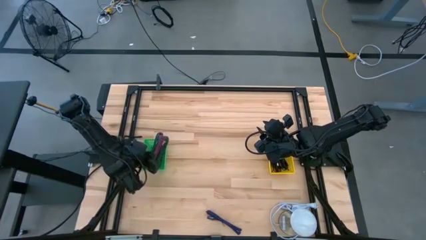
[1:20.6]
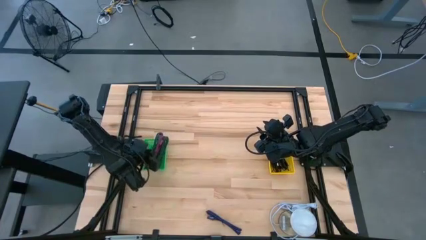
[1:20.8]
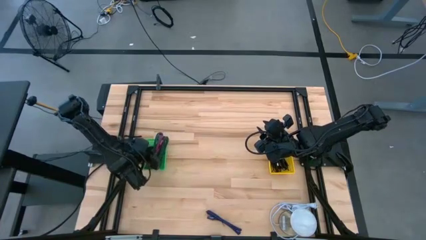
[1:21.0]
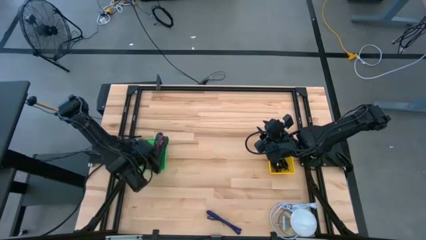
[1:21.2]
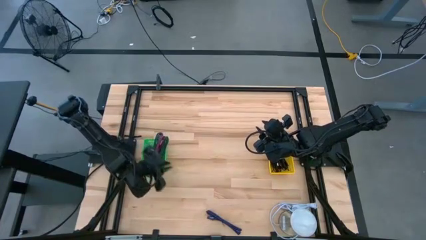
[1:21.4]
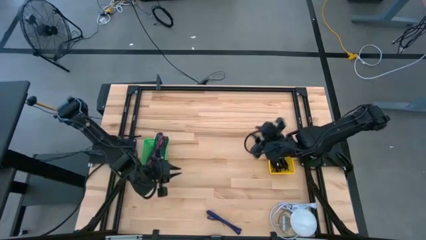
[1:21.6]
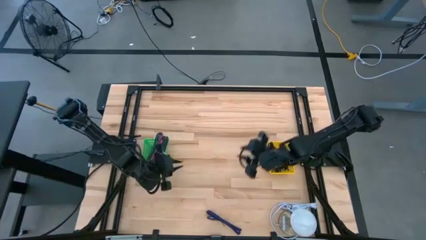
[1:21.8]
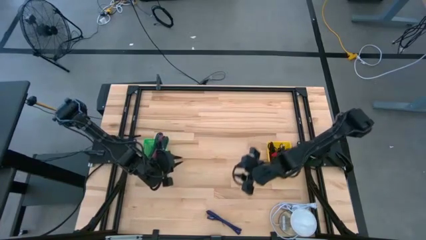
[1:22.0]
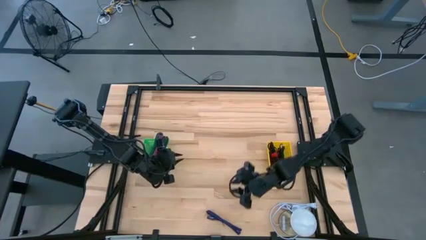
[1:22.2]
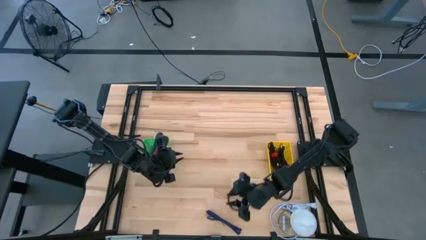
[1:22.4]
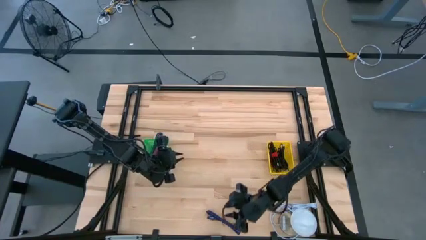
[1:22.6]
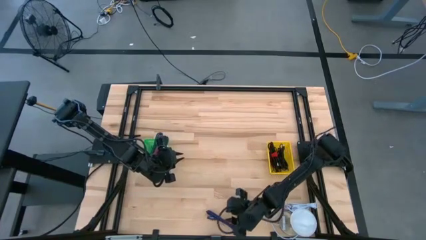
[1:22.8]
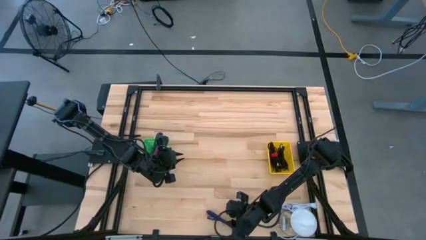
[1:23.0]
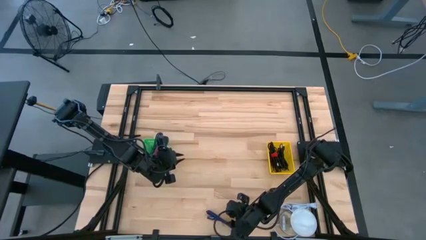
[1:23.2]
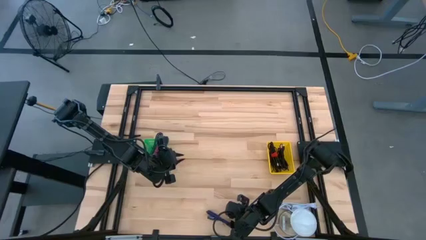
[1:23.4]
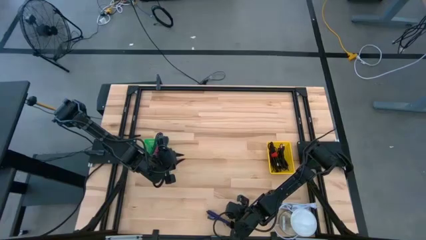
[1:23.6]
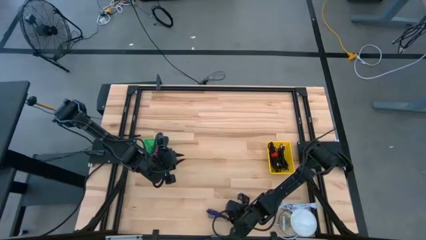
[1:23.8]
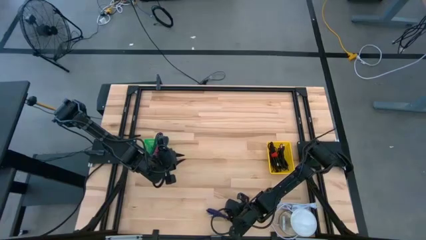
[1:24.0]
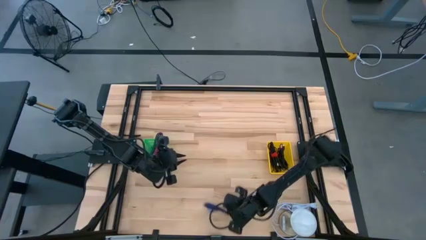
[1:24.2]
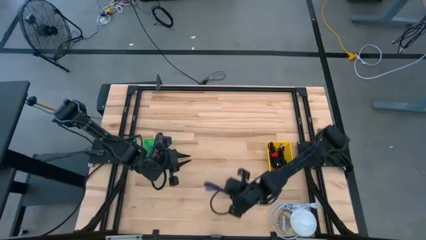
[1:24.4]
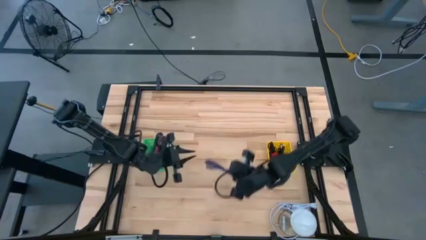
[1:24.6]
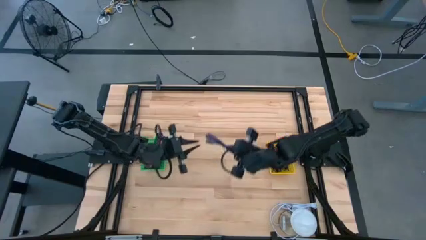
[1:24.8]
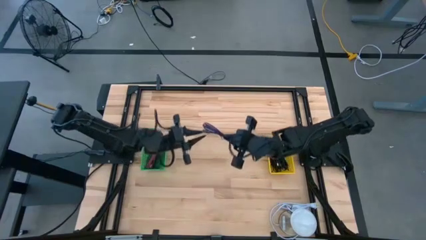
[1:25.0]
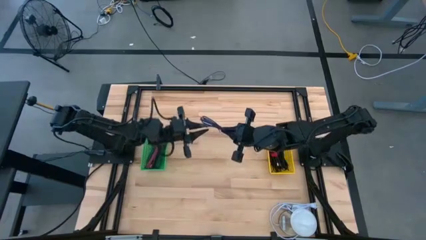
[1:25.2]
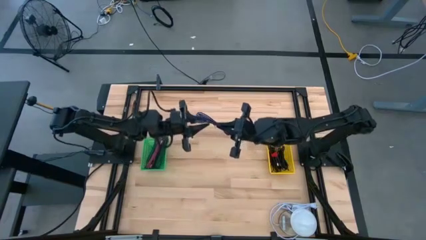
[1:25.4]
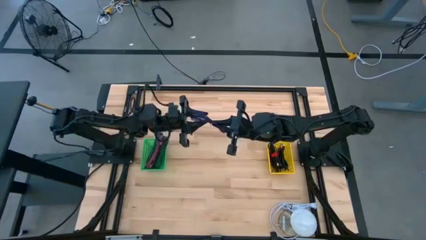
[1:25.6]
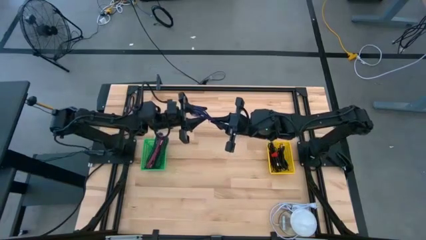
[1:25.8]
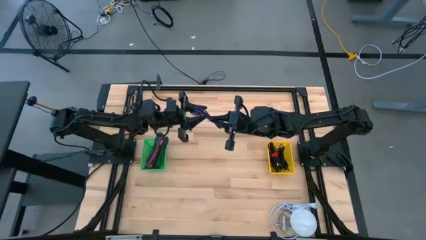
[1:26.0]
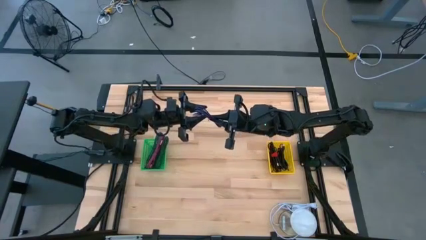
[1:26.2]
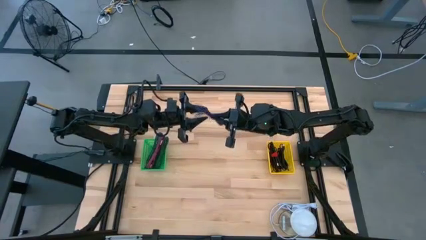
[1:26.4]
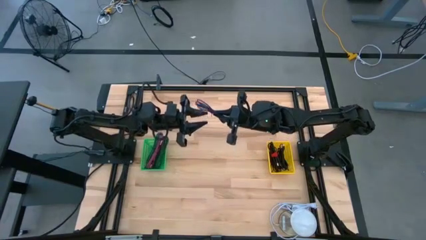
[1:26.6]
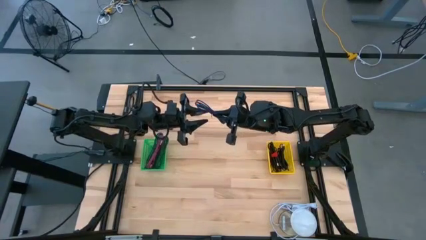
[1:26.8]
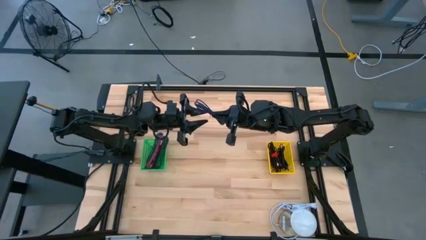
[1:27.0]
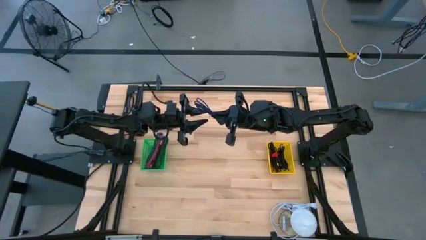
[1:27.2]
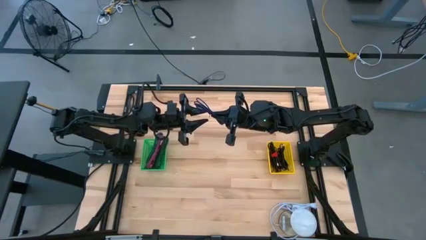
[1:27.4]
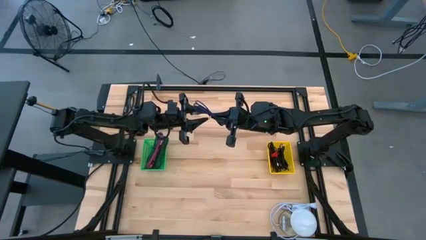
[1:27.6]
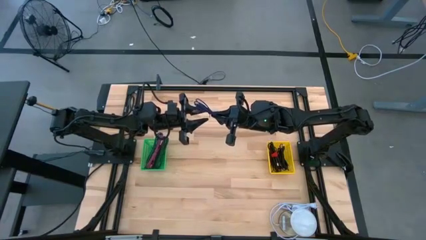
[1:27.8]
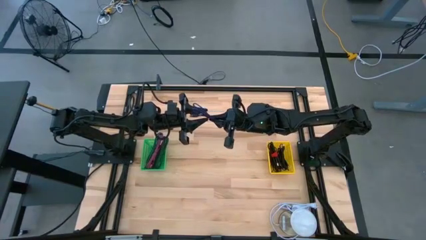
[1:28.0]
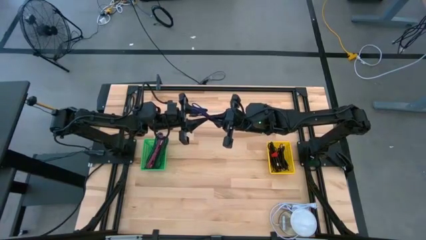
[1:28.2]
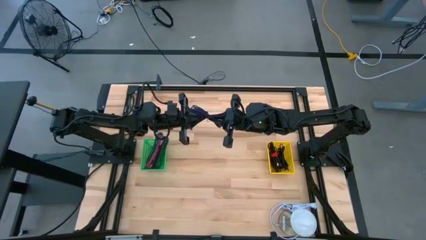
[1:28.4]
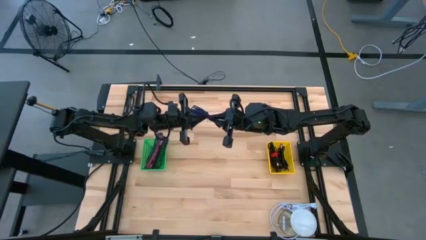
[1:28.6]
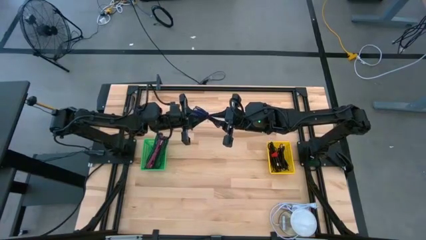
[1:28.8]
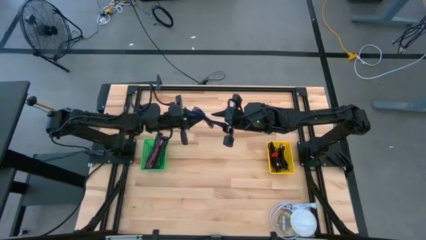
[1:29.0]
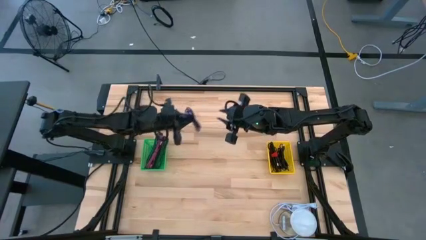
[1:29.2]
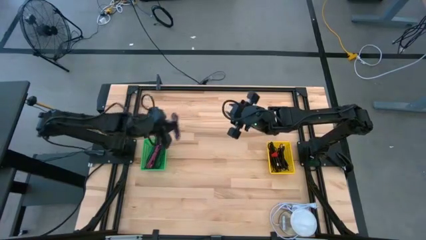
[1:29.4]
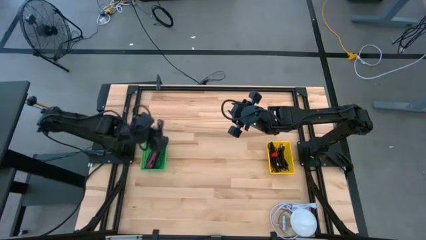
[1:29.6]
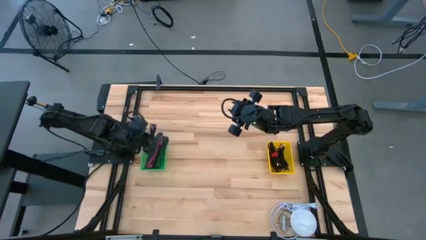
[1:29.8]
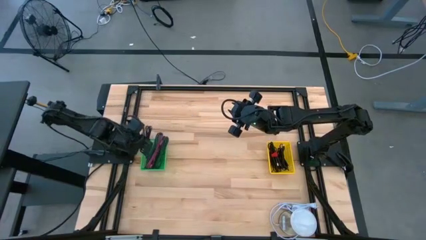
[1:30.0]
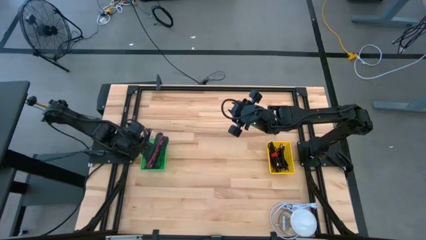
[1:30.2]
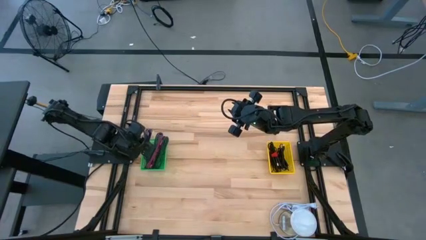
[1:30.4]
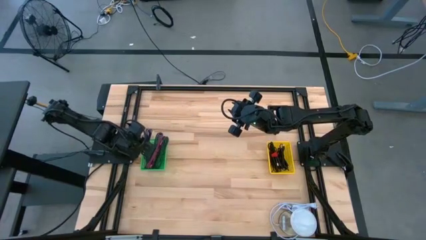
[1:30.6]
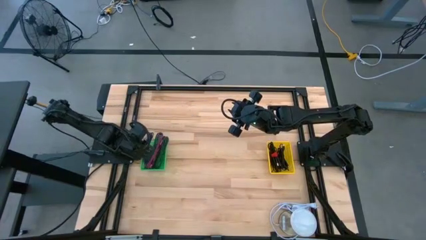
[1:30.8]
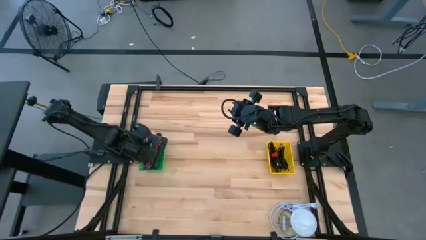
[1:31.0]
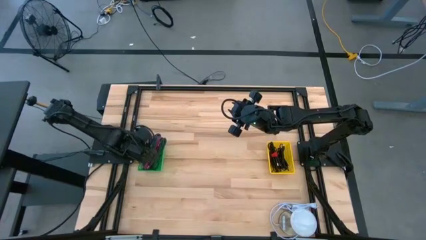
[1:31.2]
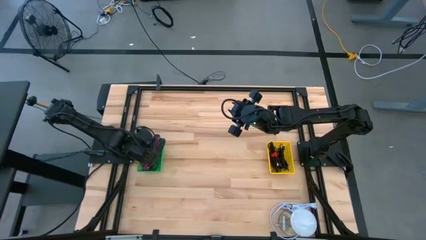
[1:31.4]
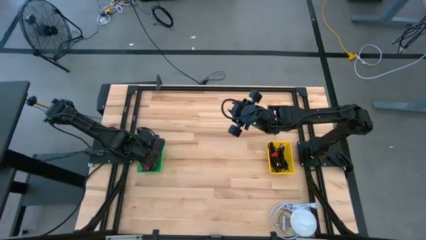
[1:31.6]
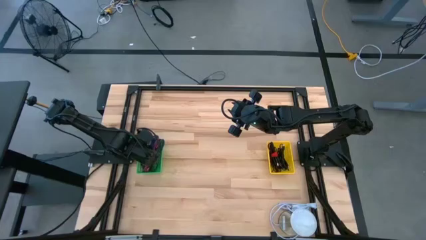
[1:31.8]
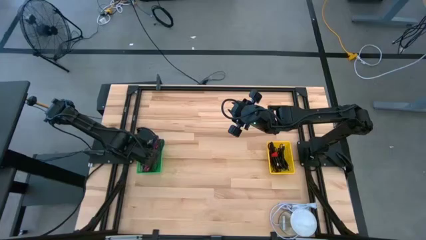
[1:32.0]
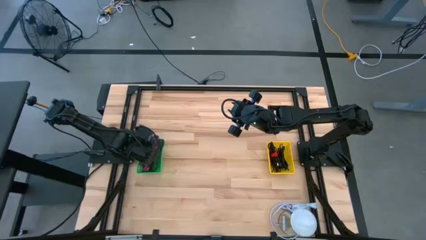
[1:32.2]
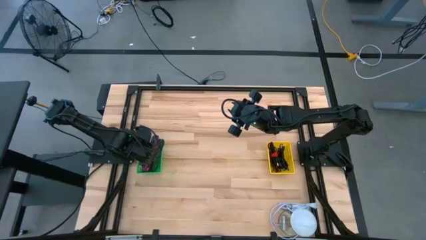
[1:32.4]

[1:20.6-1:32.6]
Task: Pick & Place USB Port
Put the purple black charger cable into the green bin

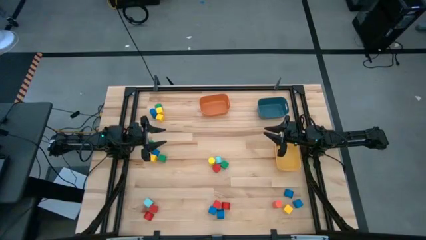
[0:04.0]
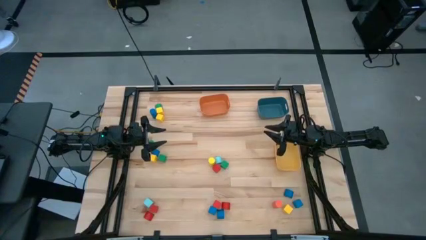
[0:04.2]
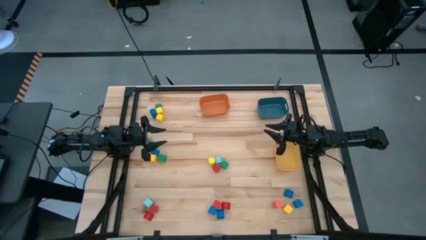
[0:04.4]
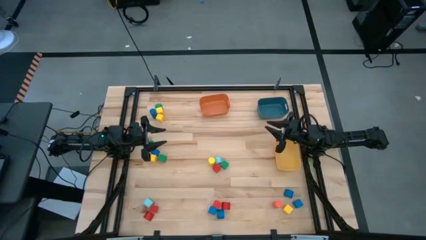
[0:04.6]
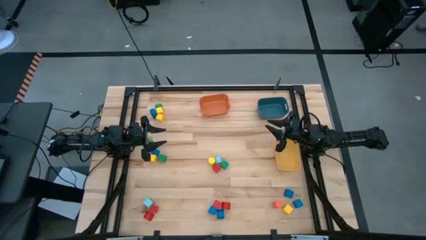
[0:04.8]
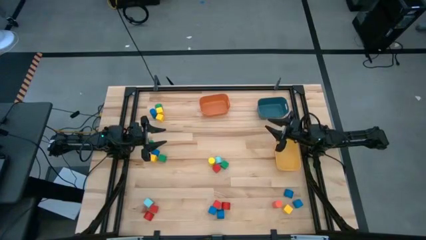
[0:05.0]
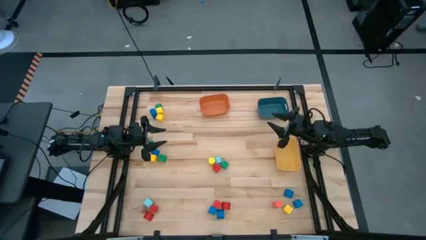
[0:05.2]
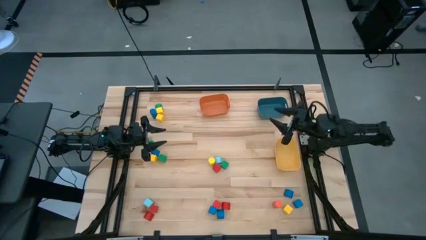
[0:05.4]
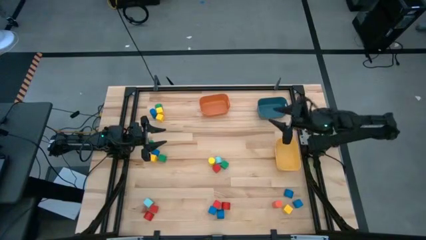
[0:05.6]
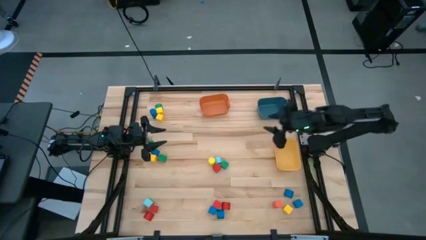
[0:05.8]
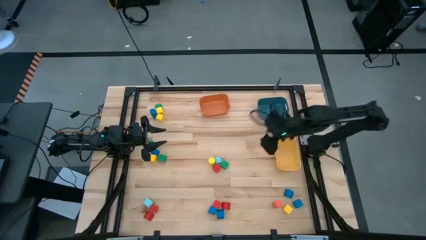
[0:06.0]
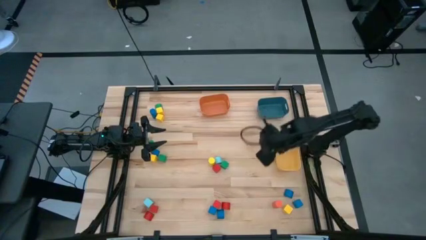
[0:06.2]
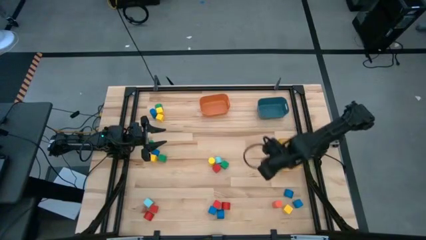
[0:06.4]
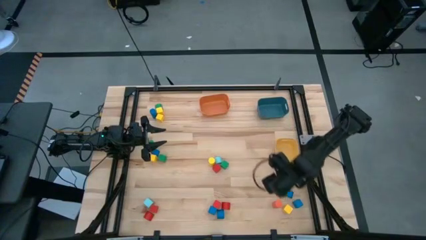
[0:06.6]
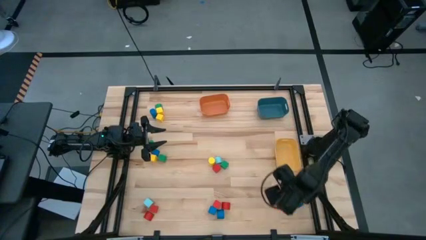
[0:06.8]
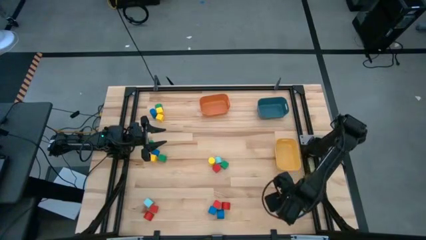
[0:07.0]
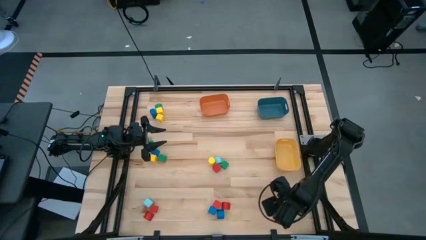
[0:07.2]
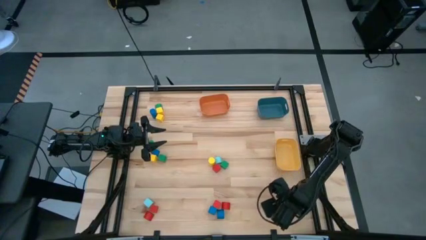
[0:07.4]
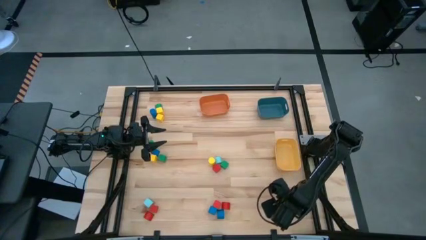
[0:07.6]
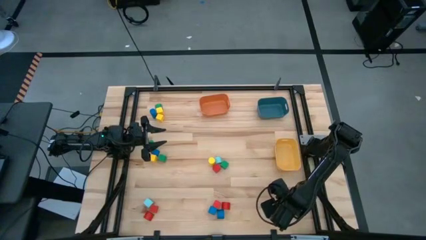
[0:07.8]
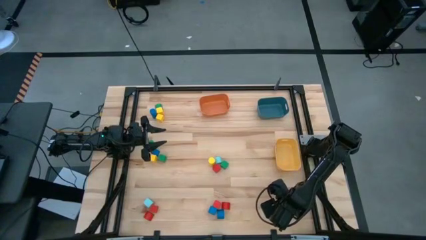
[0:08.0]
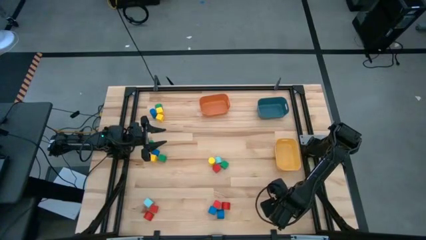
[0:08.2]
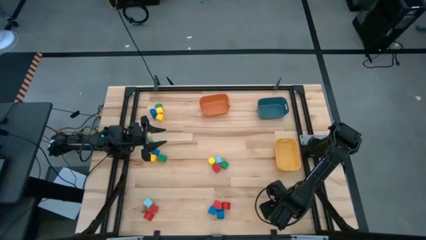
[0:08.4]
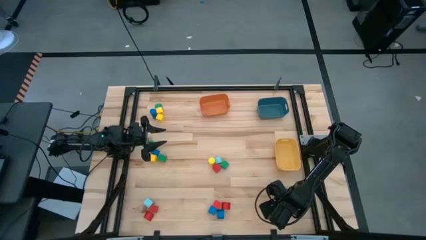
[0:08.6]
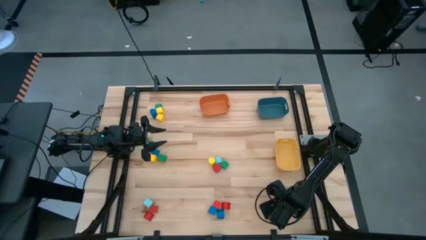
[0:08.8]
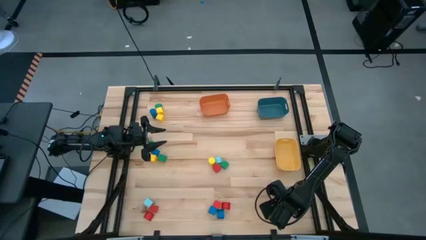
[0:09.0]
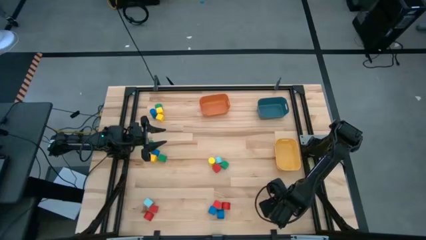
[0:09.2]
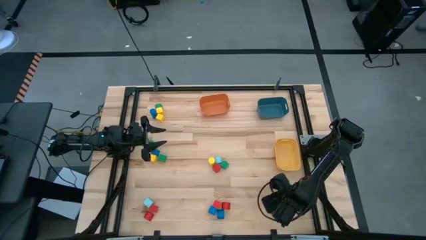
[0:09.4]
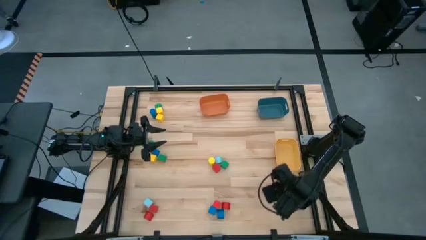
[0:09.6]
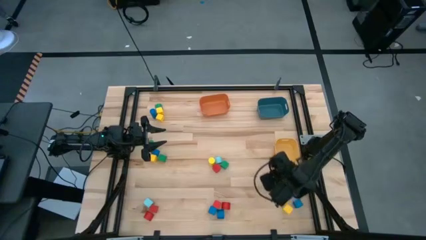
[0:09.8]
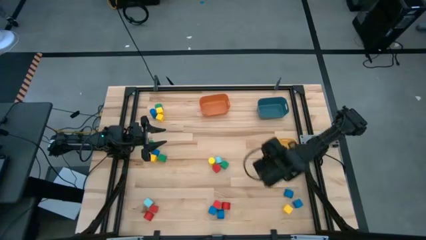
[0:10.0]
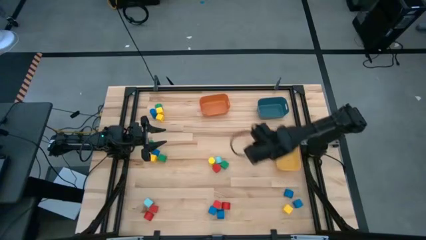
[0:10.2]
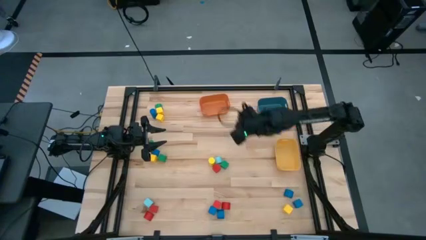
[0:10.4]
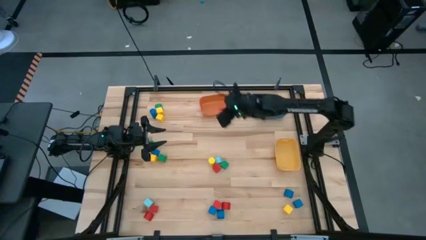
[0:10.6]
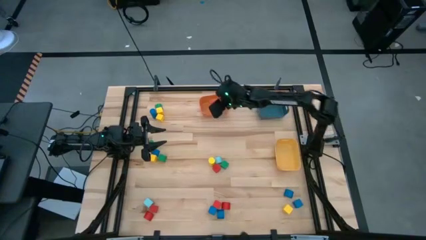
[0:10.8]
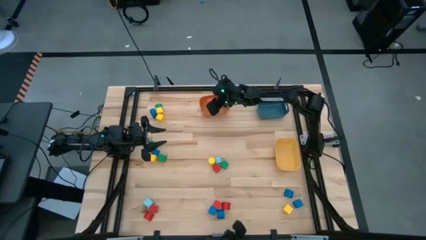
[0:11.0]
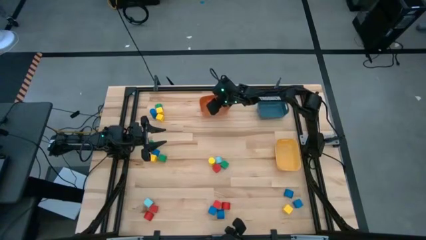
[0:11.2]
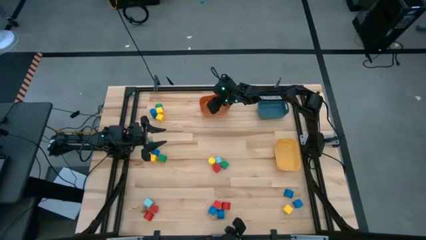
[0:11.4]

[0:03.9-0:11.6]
Task: Sort blocks by size
Put the orange cylinder block into the orange bin
